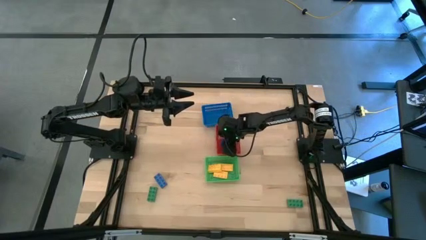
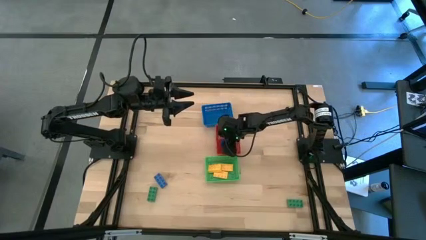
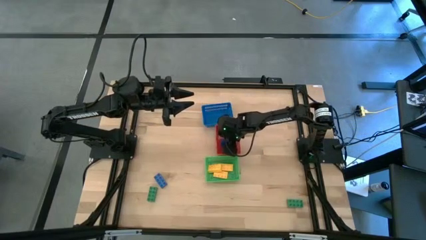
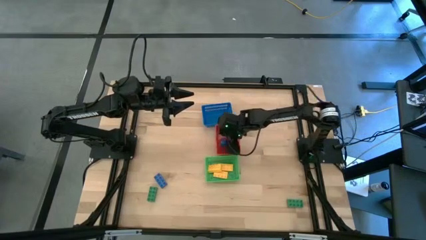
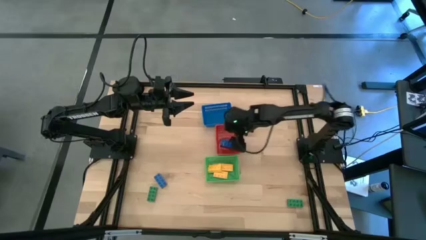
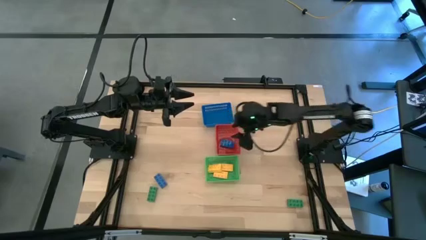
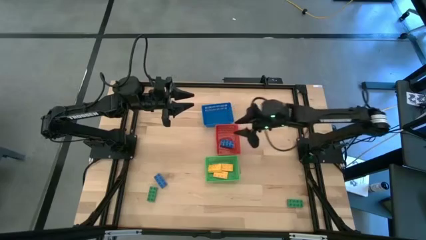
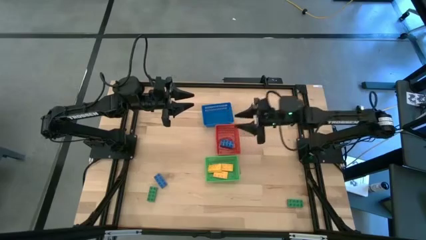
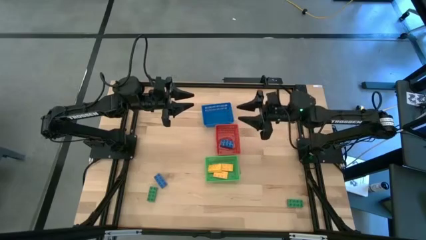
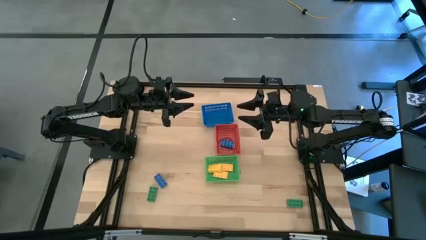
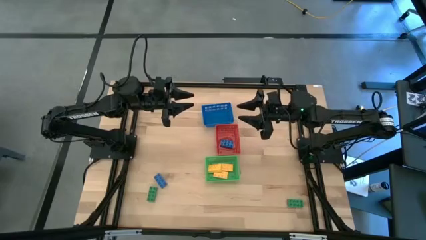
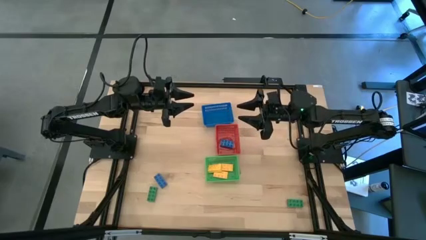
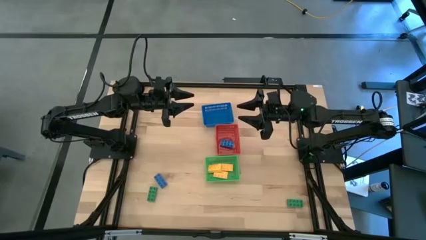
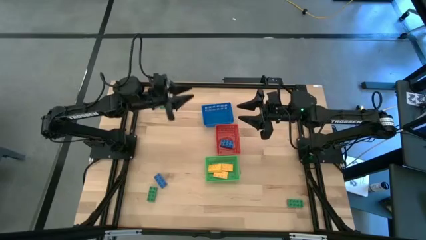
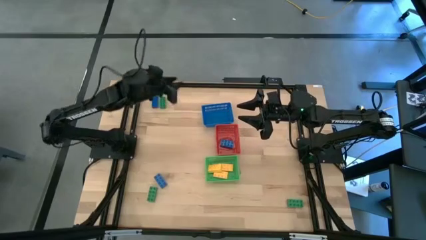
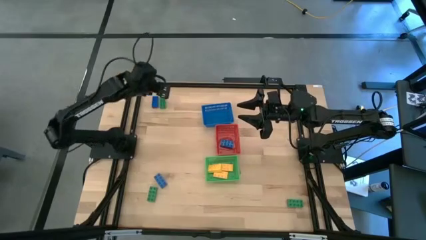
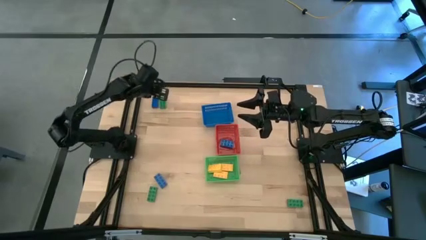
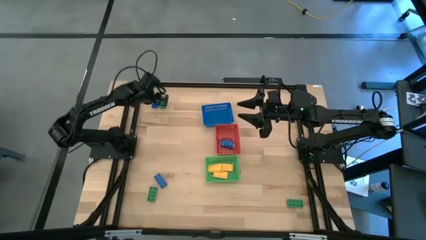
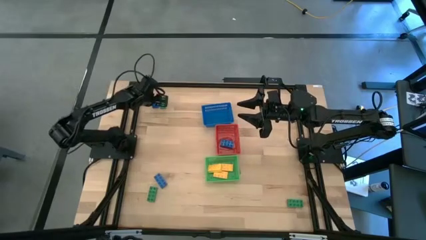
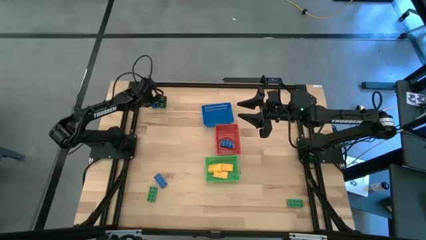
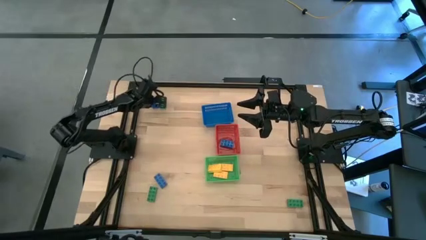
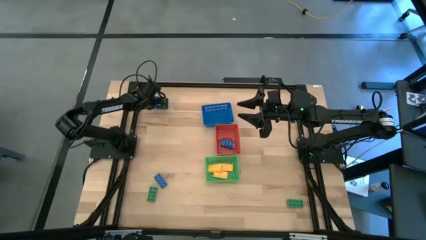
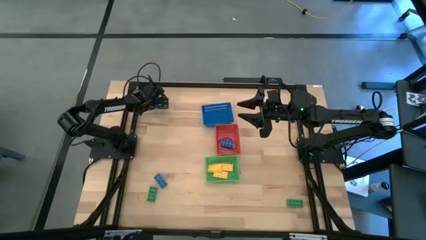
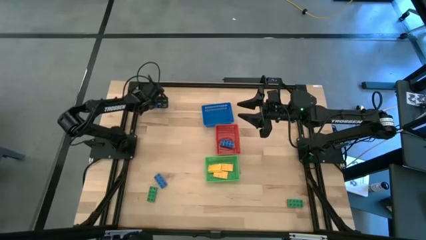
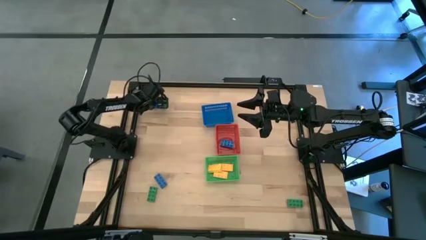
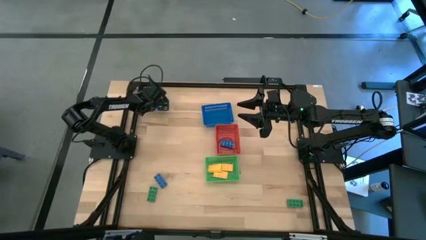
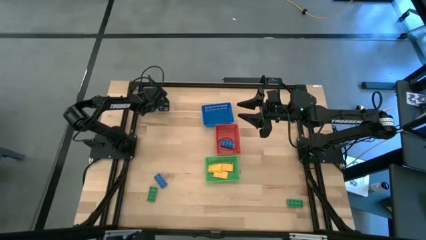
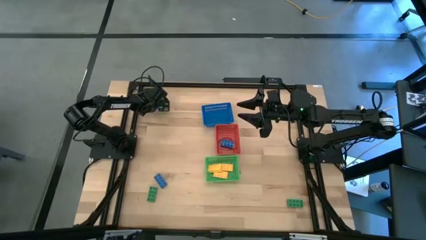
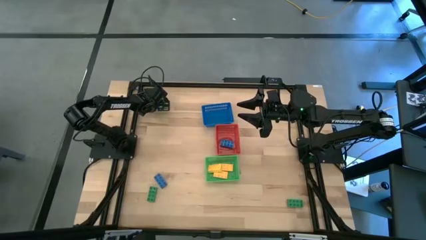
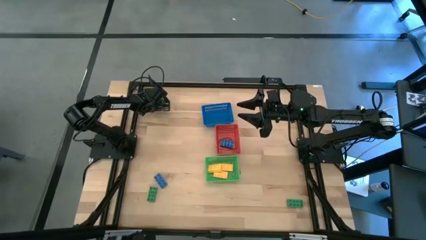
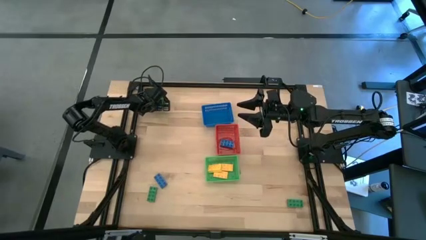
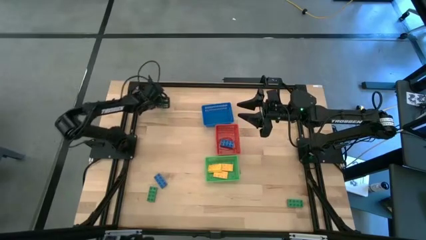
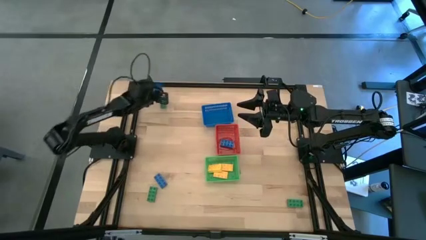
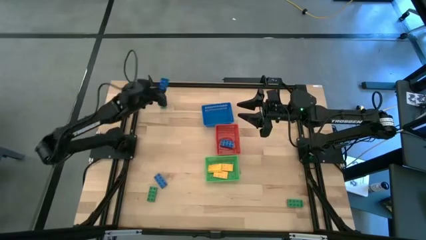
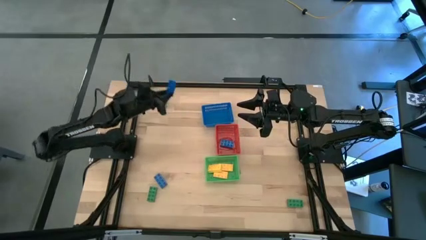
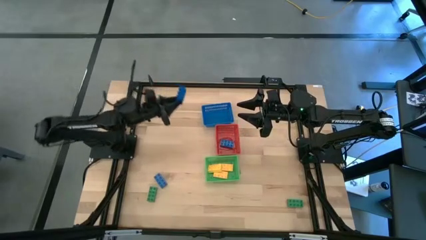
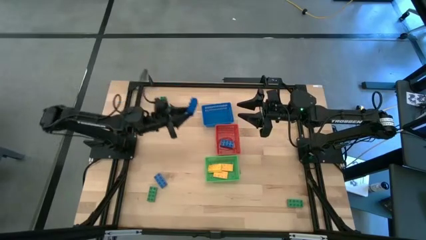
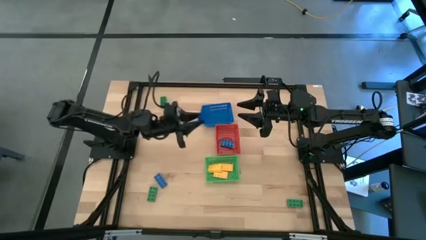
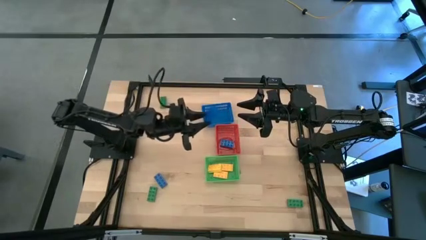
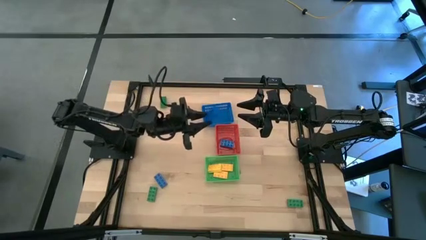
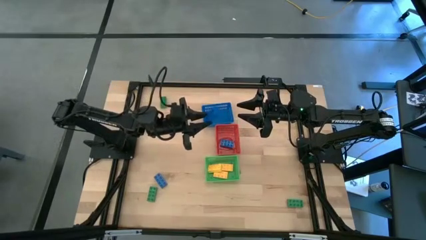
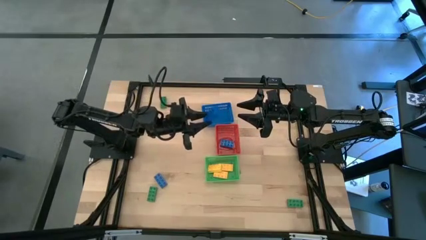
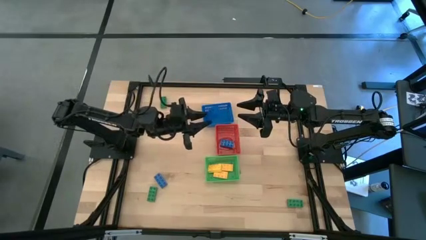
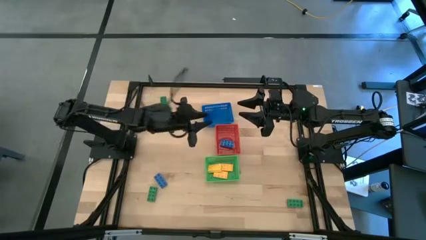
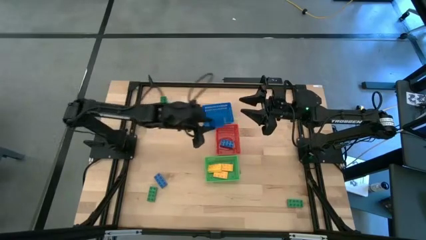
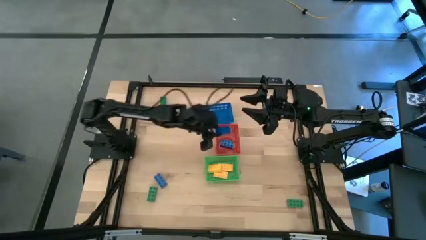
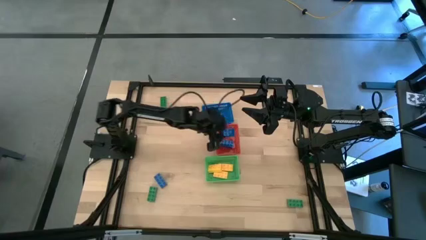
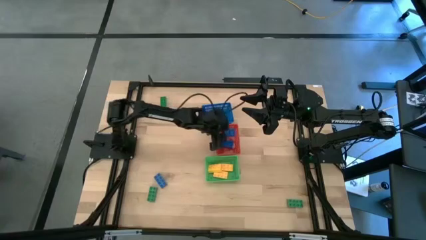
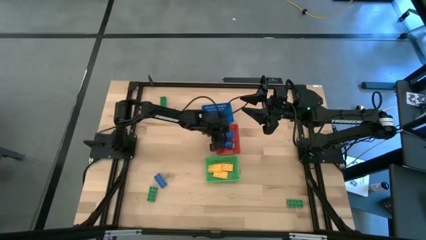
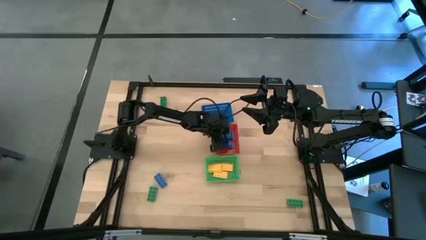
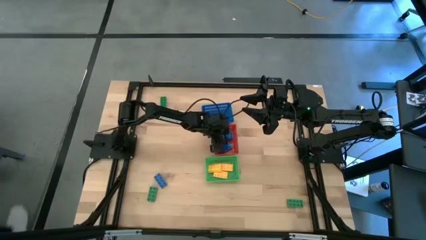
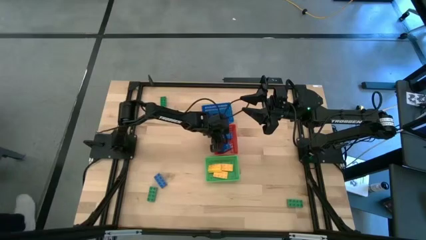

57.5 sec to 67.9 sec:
Task: Sort & place blocks by color
Put the top blue game piece into the red basket
